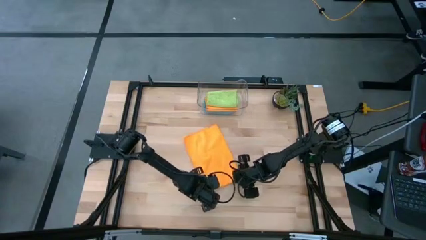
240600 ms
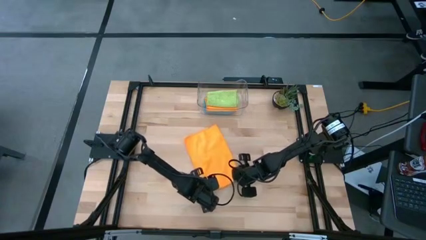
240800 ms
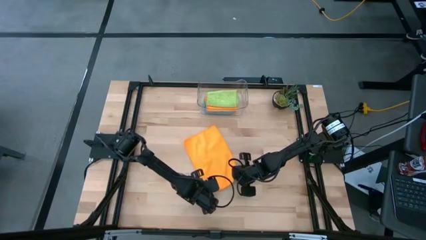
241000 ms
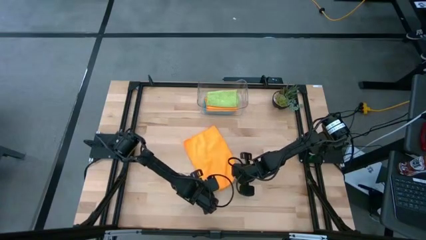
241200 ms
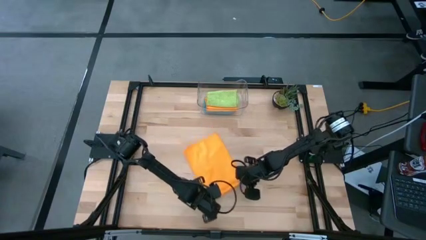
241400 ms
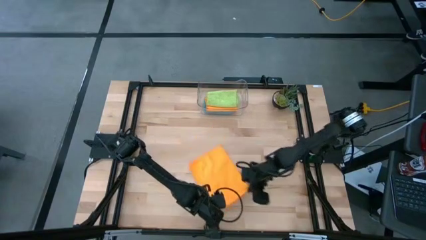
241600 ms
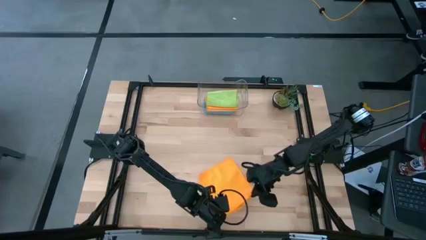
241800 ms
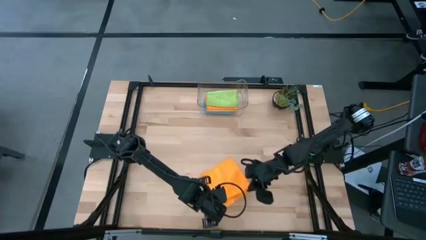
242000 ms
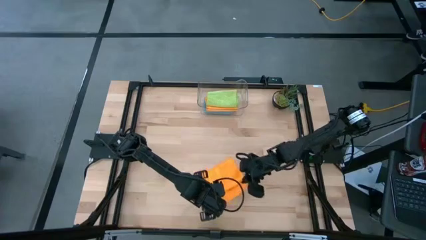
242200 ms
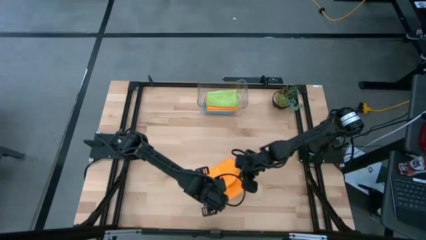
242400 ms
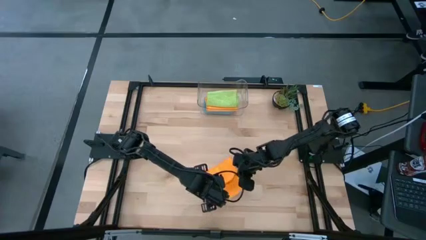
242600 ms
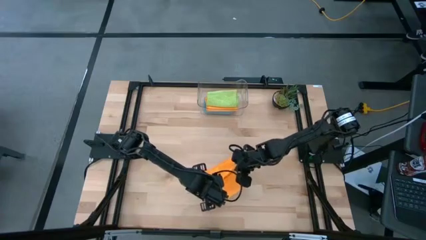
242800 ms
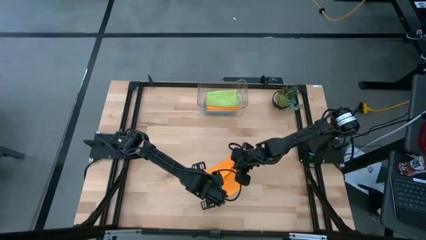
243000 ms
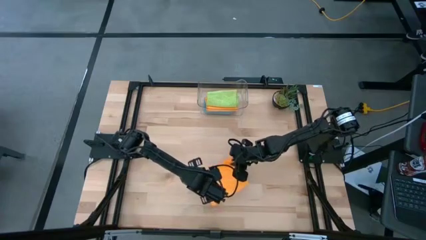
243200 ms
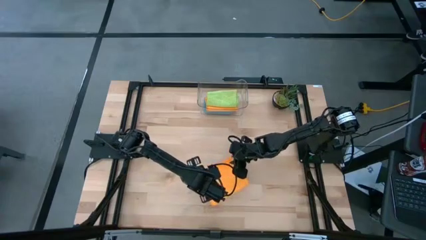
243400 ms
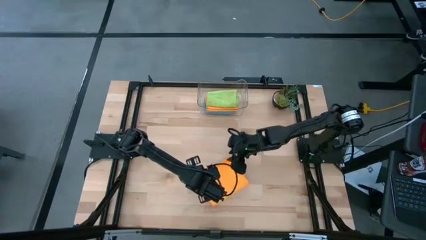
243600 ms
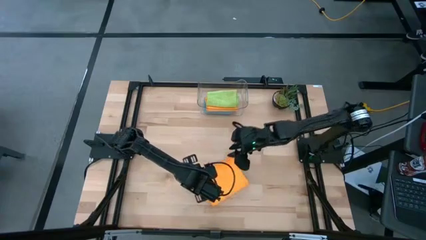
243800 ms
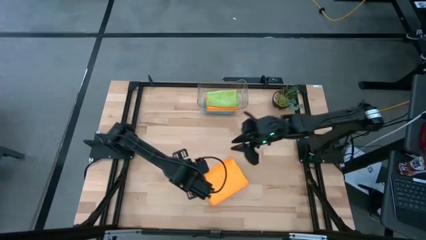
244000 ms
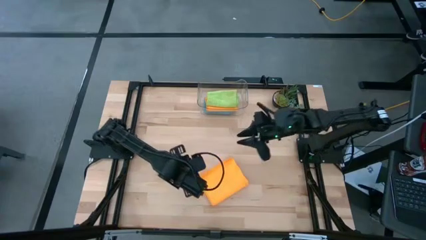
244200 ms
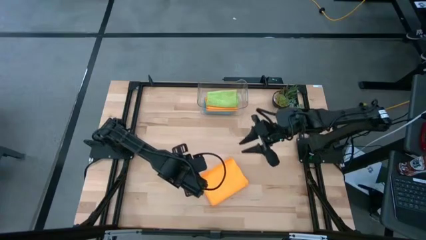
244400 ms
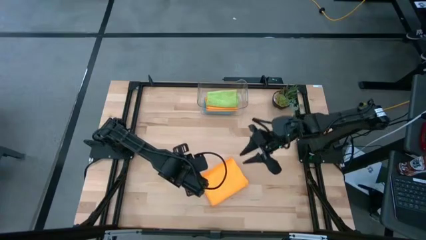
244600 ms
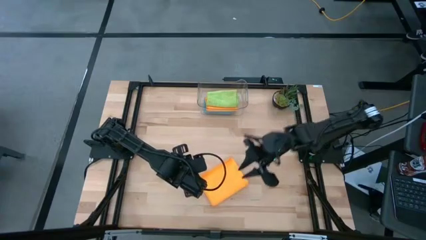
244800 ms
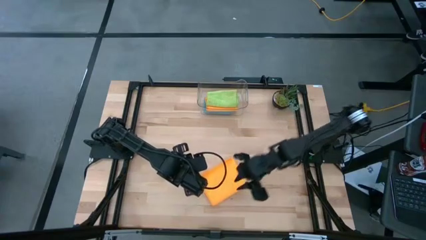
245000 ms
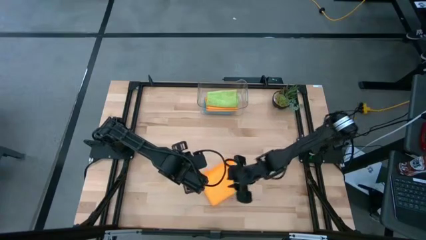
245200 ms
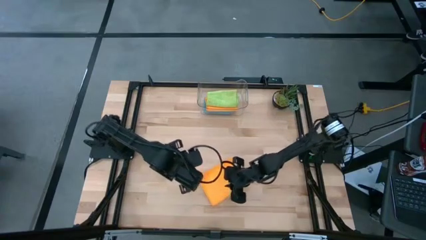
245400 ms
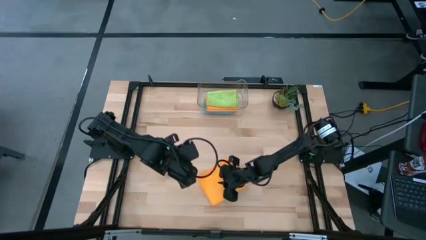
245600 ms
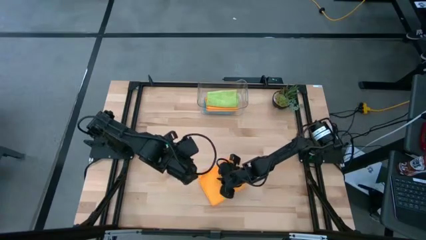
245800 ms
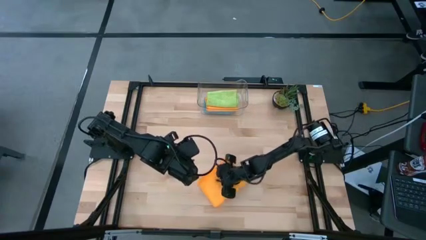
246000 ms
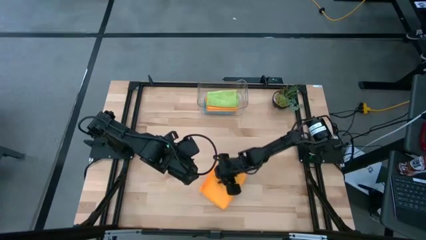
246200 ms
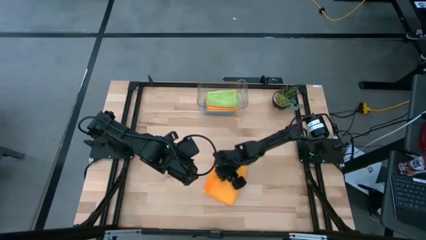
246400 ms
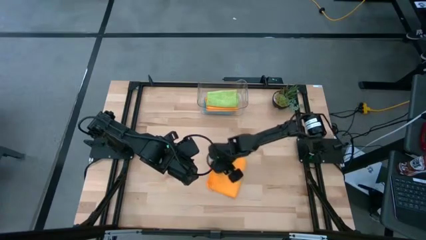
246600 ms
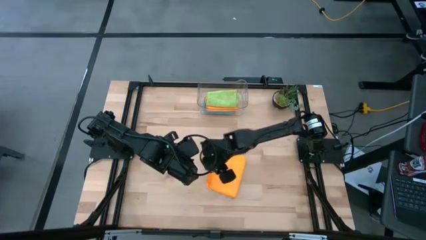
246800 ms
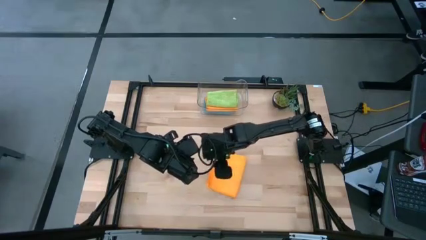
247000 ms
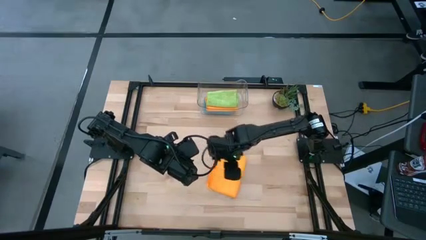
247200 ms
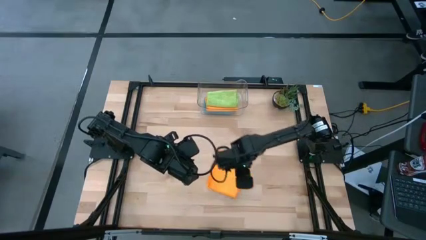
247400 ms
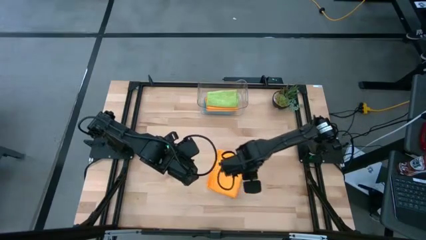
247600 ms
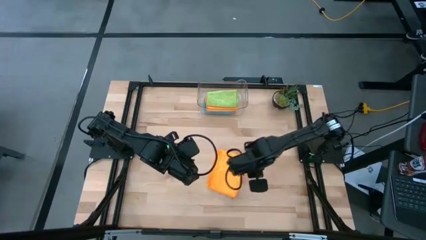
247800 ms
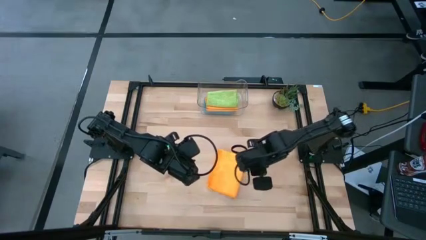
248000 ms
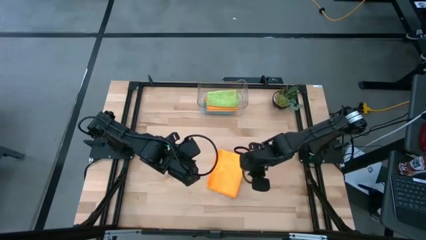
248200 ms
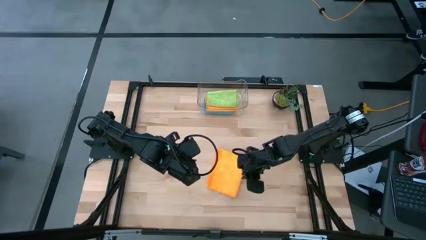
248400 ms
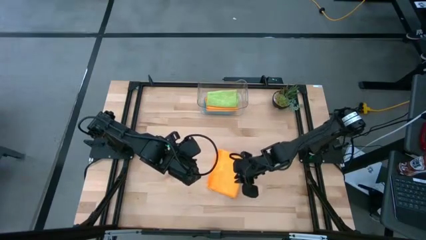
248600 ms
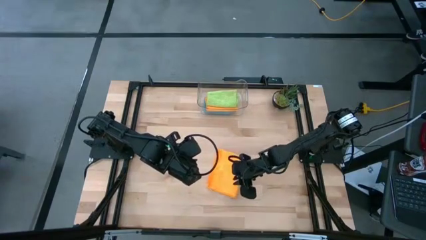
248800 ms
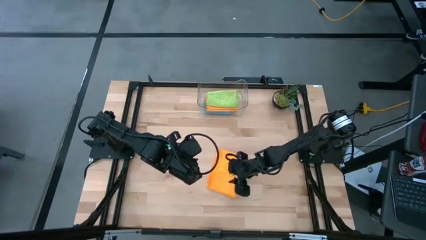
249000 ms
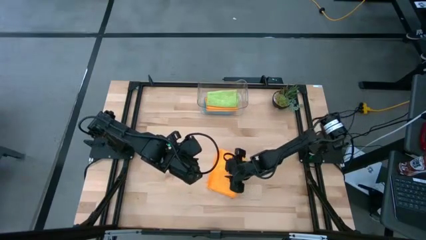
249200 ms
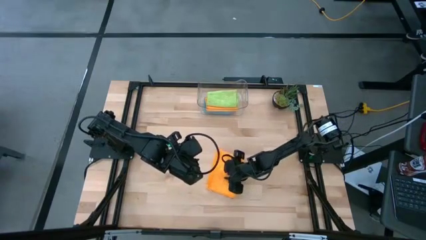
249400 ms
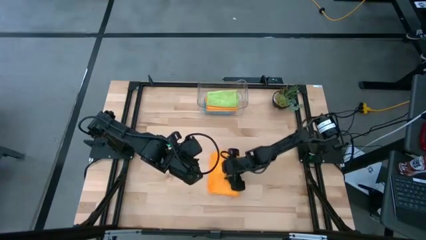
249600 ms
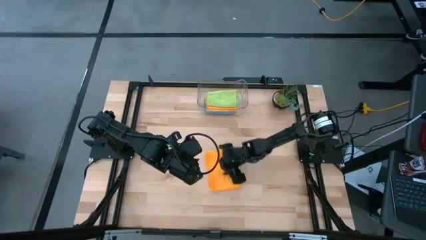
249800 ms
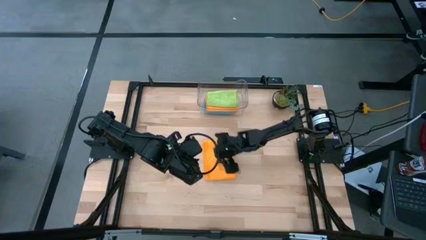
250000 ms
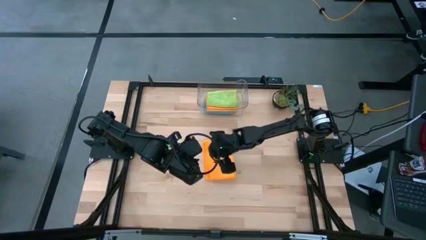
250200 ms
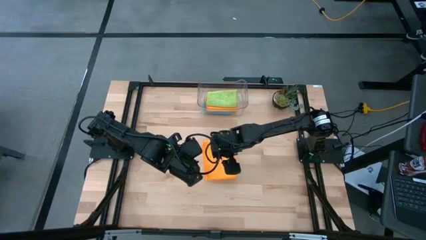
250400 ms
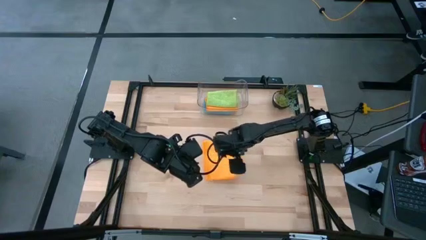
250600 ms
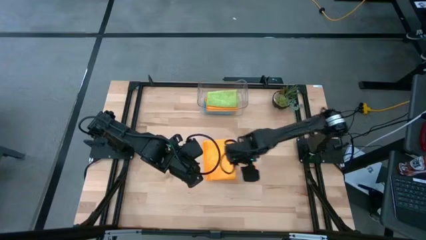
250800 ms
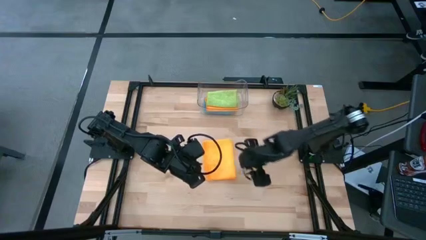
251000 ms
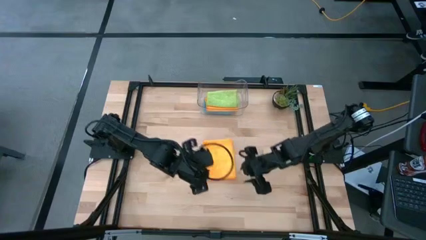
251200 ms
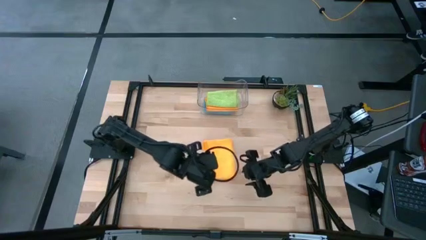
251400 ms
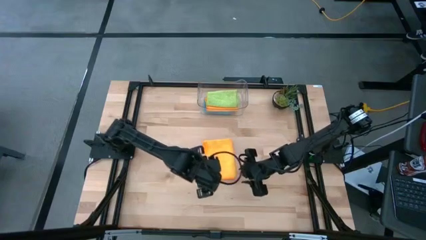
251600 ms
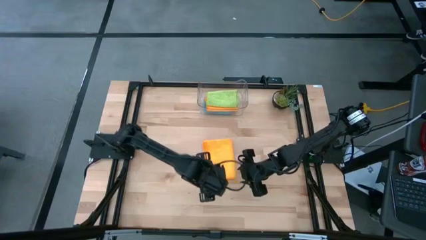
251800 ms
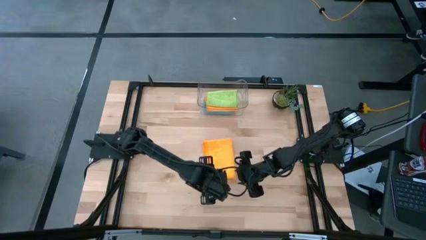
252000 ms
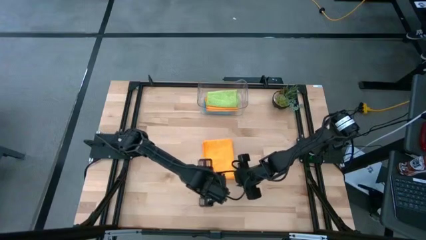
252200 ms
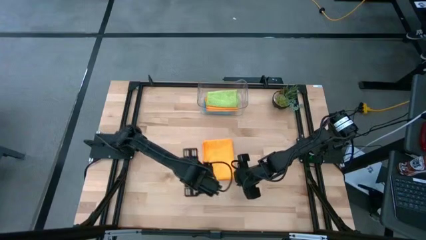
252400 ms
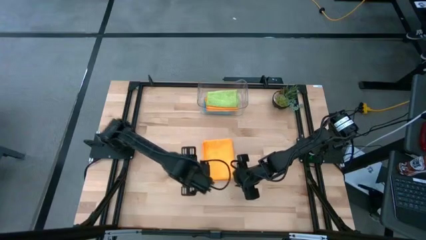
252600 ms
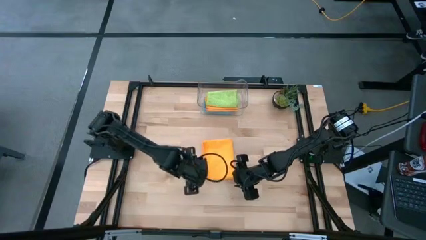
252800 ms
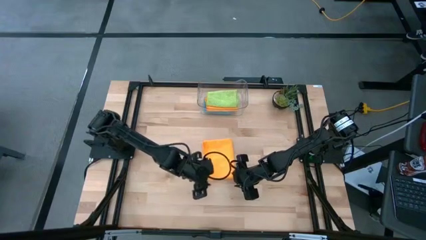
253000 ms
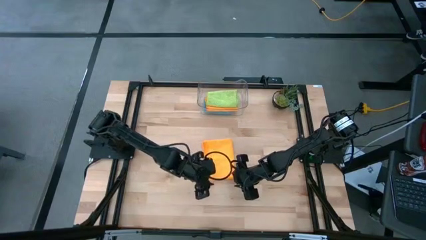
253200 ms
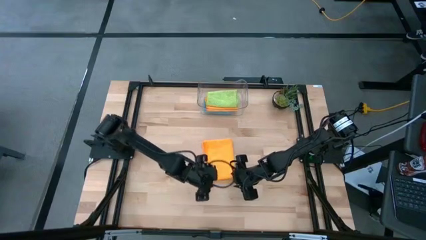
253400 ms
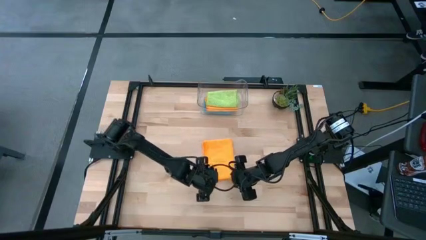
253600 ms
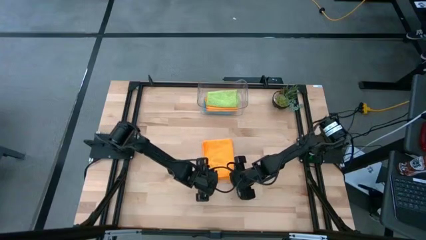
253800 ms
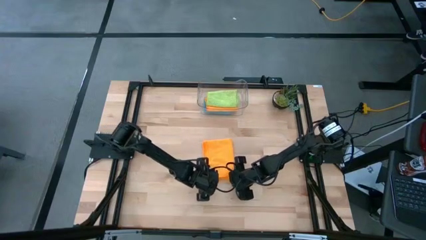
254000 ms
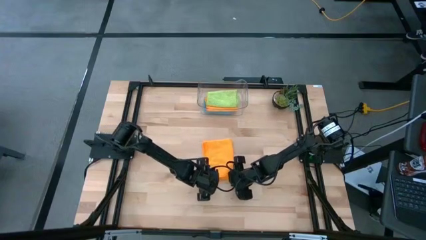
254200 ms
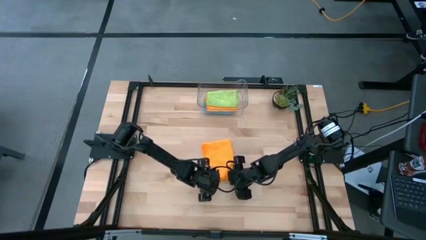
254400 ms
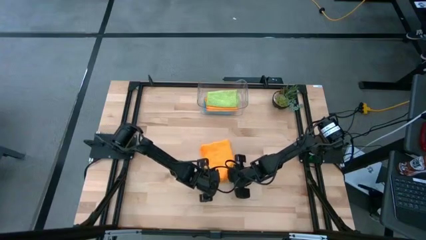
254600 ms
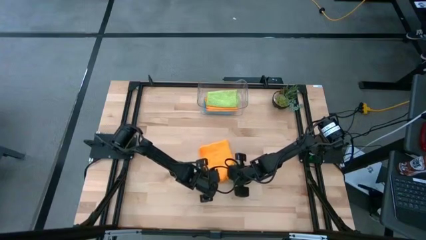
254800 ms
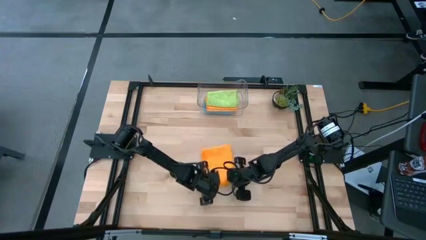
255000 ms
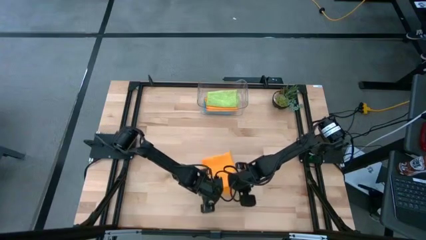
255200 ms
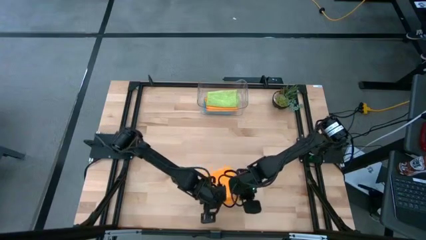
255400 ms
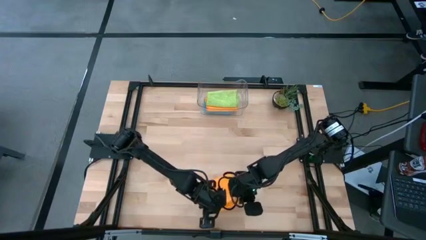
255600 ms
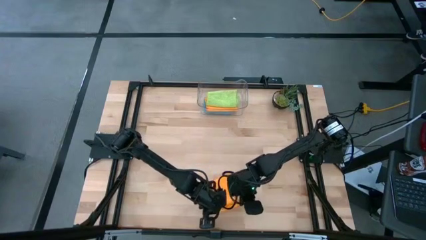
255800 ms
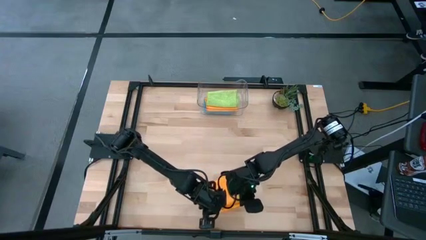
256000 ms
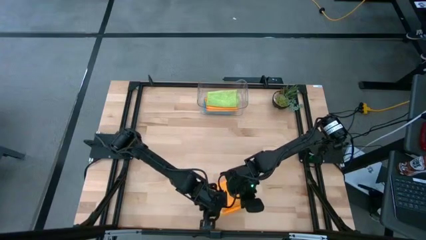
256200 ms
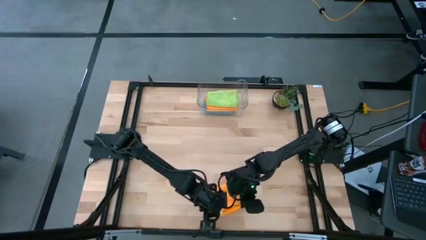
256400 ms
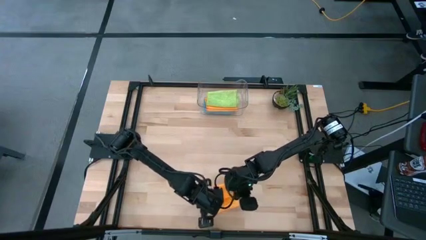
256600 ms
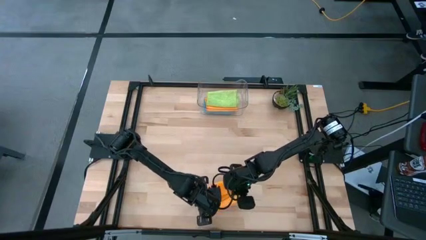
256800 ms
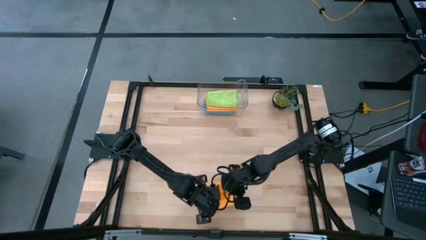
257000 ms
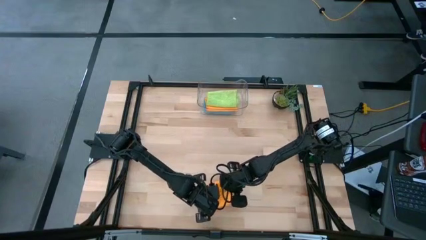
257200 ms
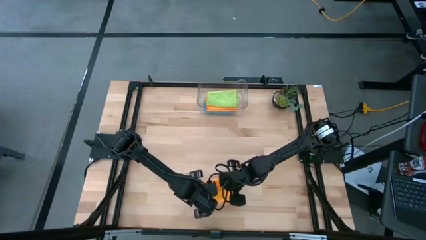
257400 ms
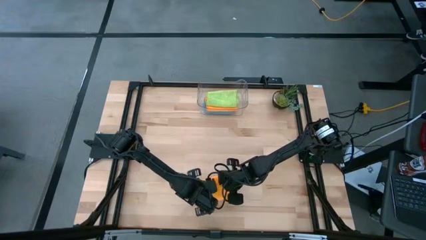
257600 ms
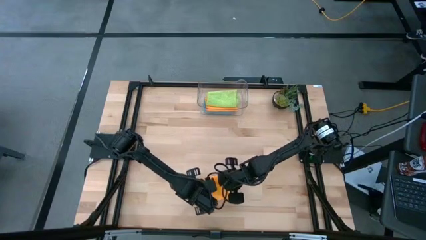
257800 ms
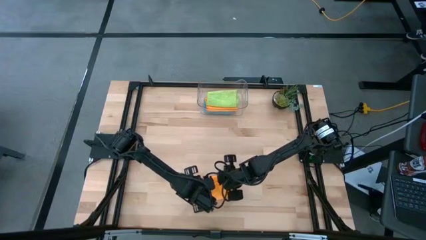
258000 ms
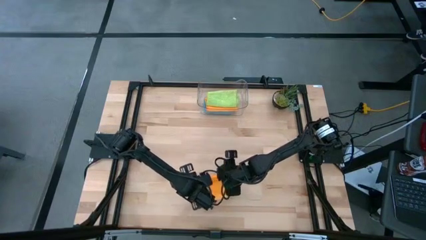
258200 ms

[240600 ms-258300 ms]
Task: Fold microfiber towels
Fold the orange microfiber cloth
